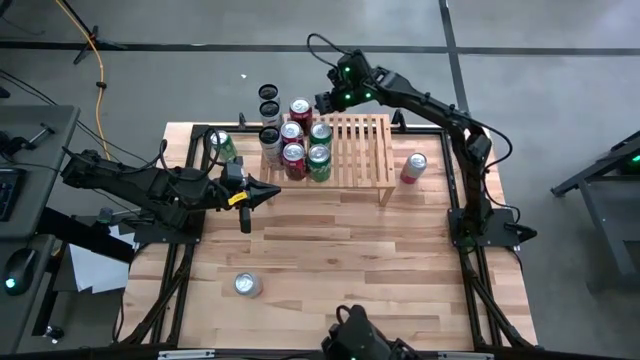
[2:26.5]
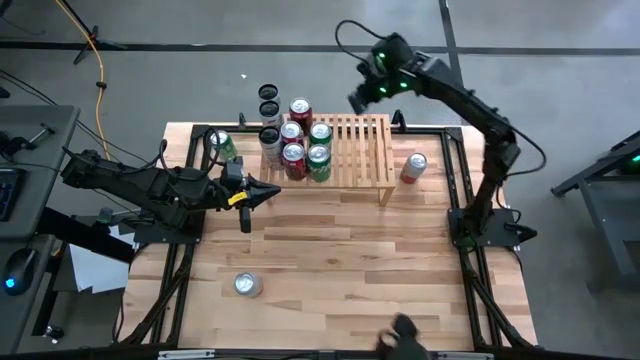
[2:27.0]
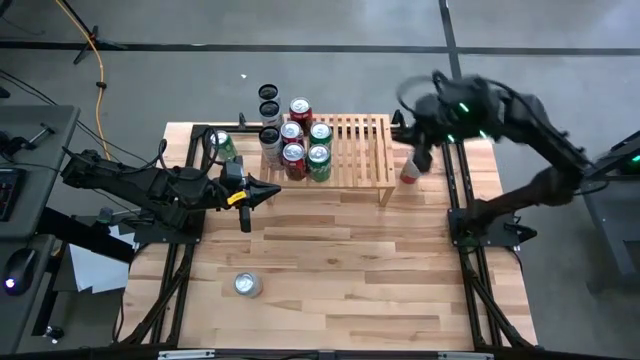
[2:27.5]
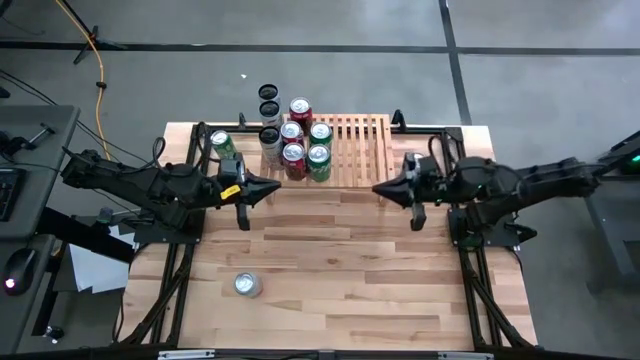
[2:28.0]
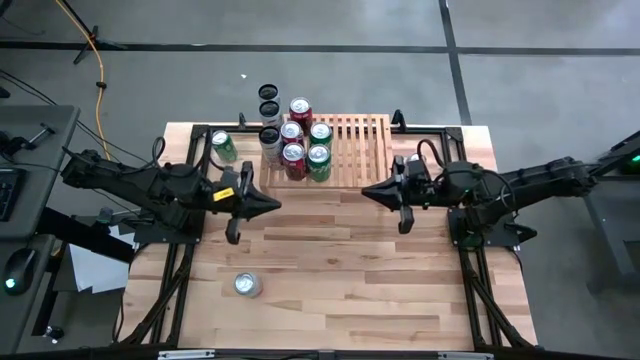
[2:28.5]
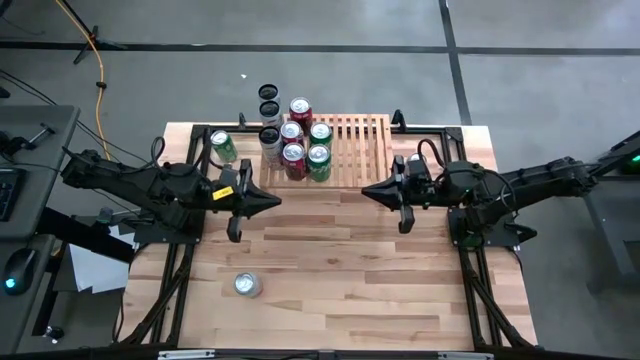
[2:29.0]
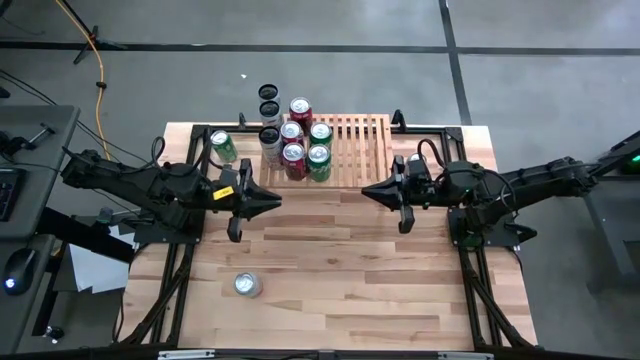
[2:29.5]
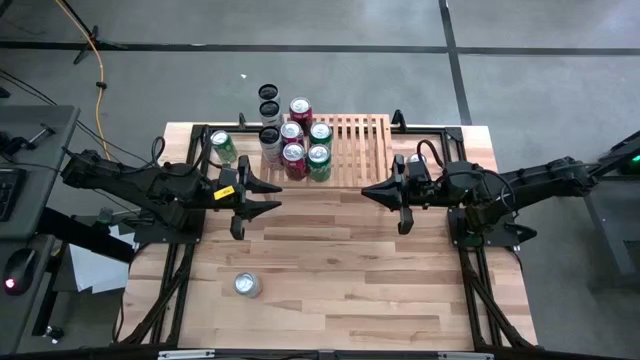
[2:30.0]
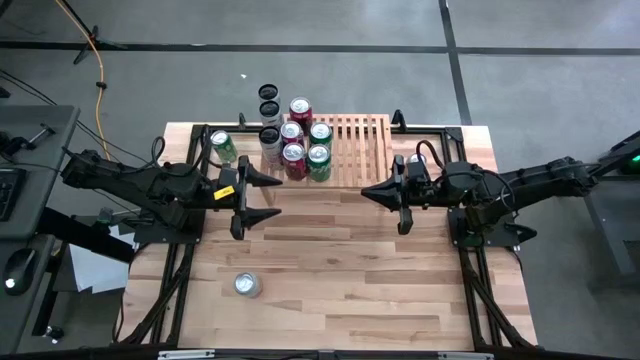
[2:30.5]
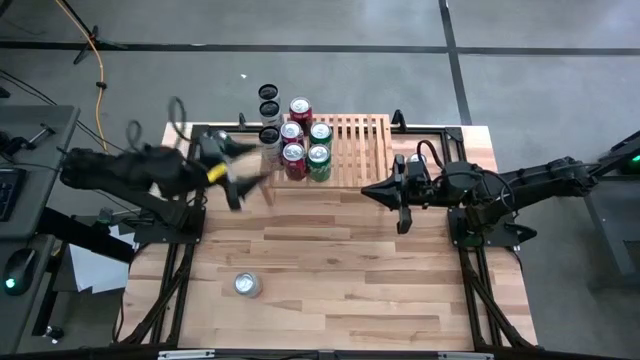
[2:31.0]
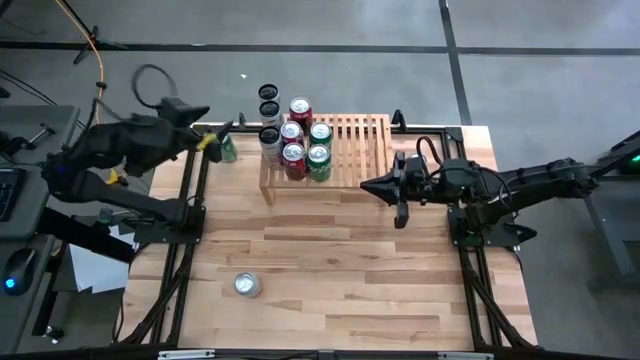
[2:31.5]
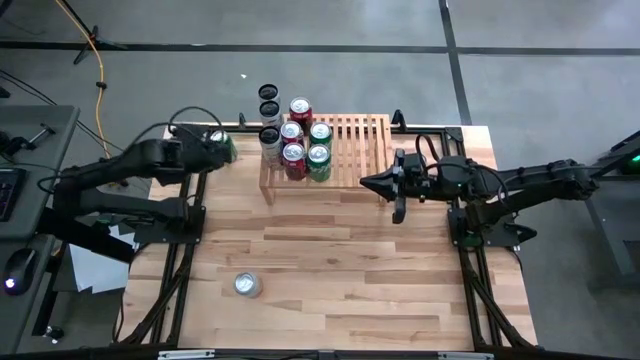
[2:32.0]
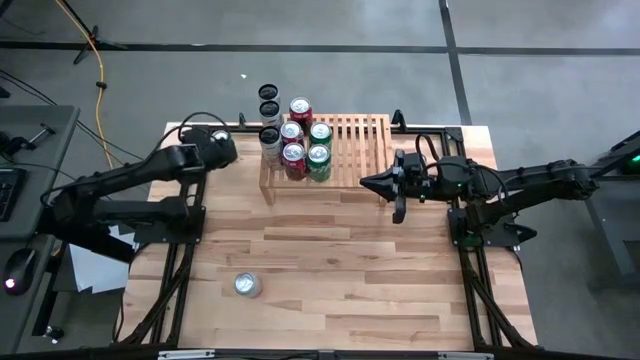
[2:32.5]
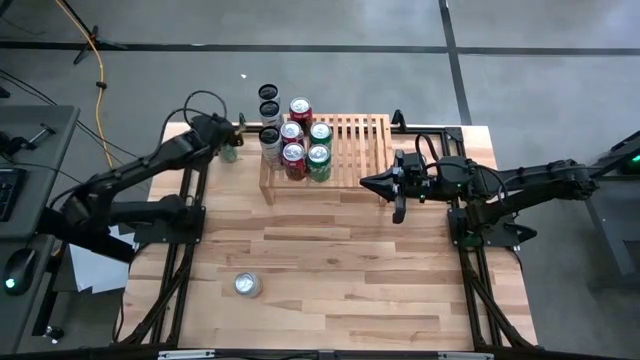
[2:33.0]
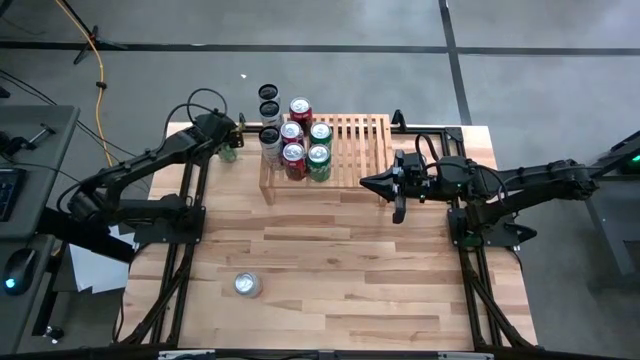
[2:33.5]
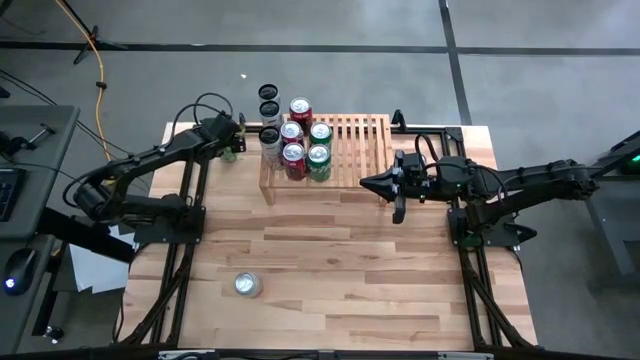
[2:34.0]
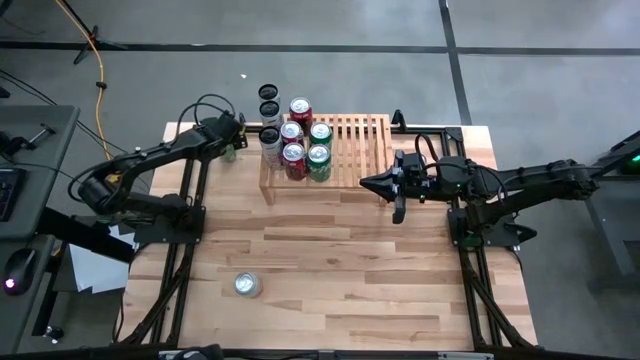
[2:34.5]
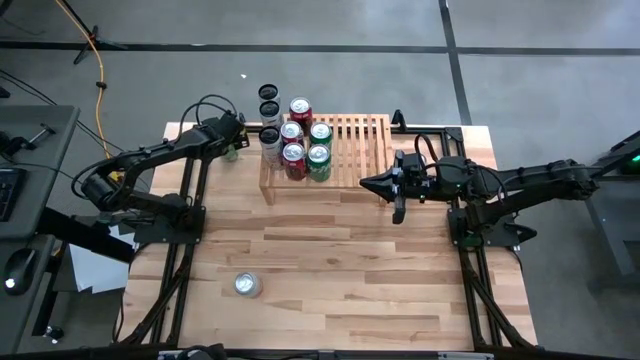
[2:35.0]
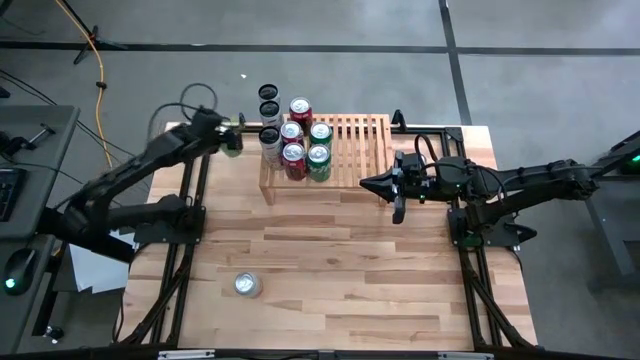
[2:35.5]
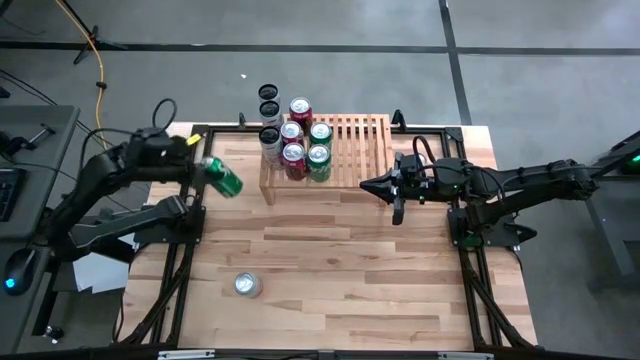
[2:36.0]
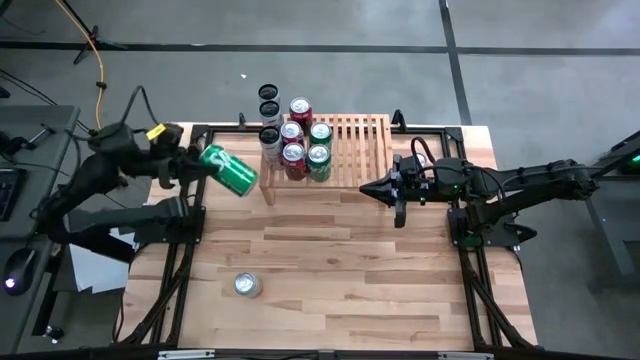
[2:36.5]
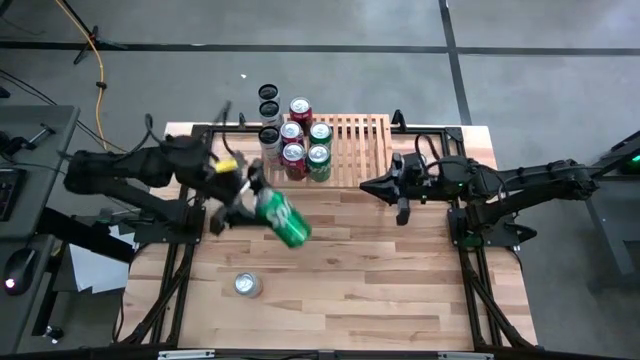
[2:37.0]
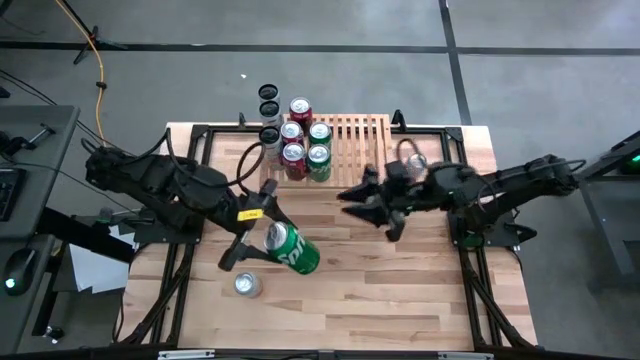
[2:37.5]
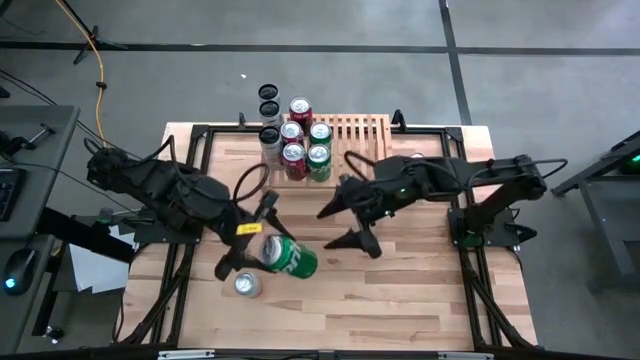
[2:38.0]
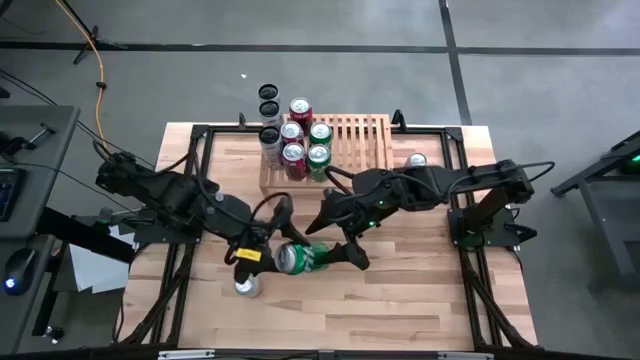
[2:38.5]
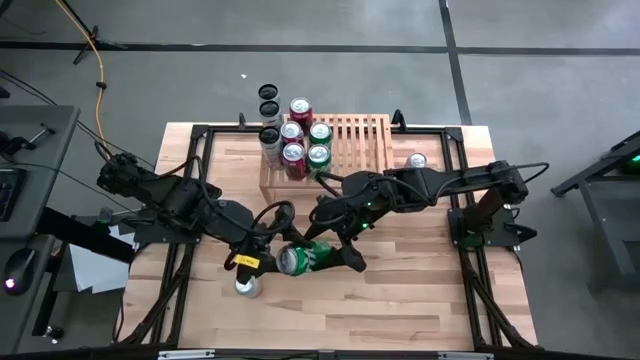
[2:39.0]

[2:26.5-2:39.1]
Task: Place canned beverage on shelf
Put the green soda can on the shelf aligned with the other green soda cans

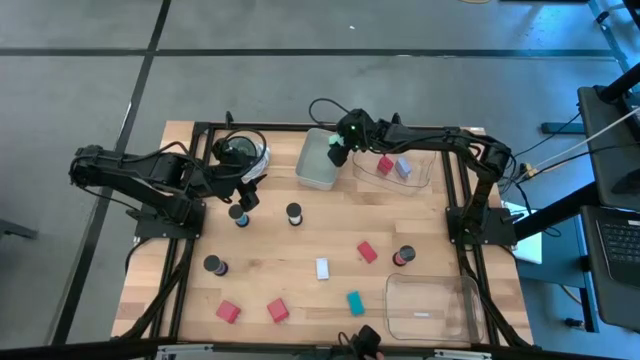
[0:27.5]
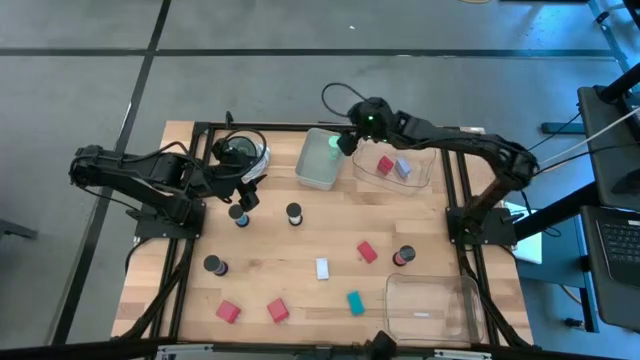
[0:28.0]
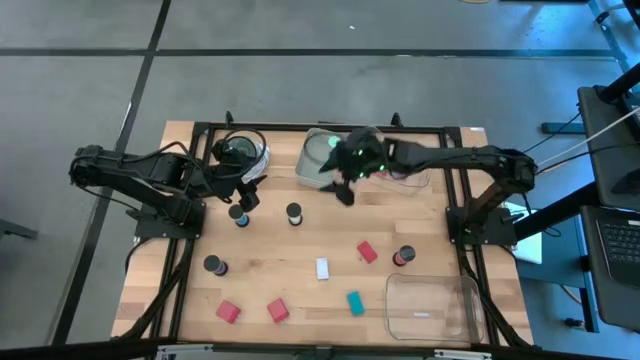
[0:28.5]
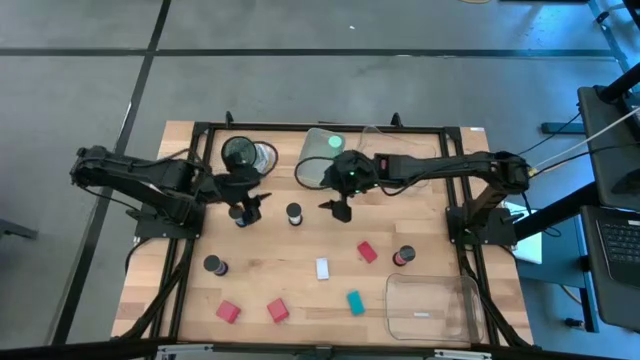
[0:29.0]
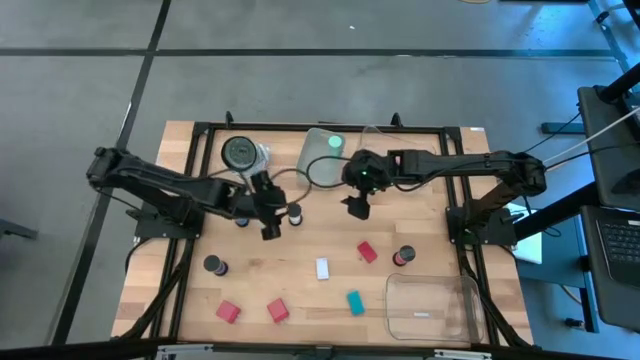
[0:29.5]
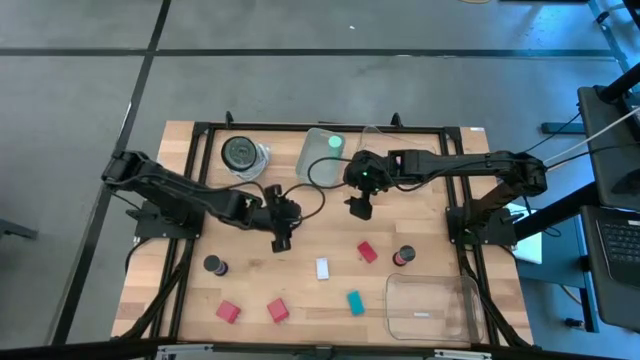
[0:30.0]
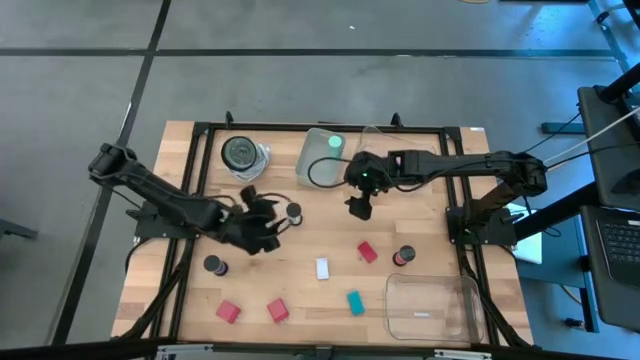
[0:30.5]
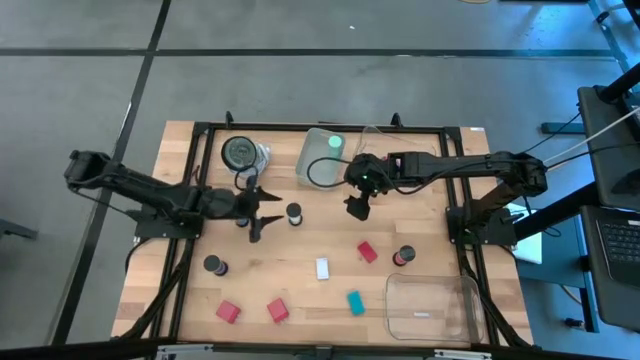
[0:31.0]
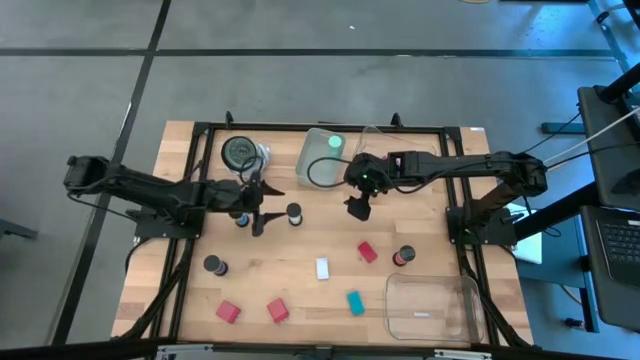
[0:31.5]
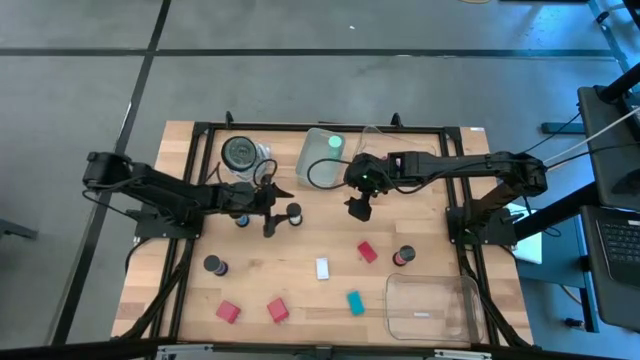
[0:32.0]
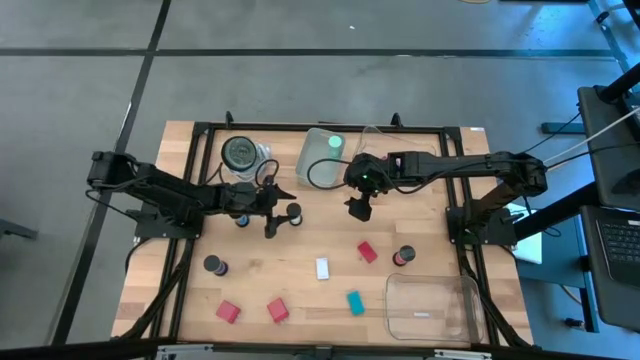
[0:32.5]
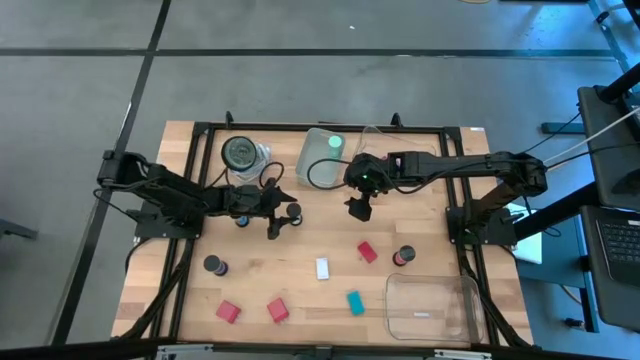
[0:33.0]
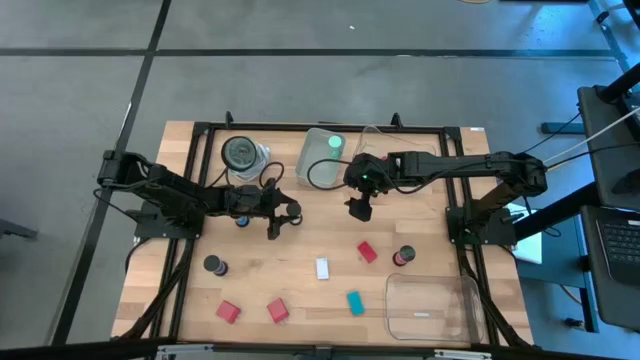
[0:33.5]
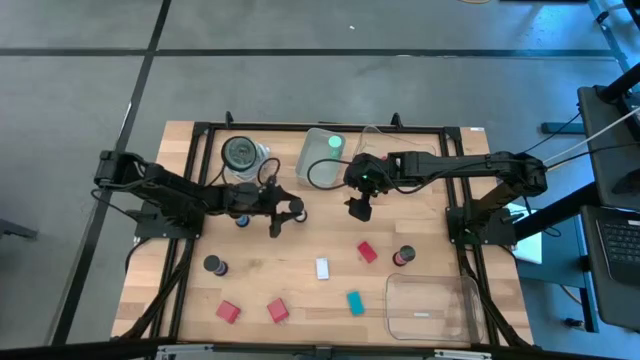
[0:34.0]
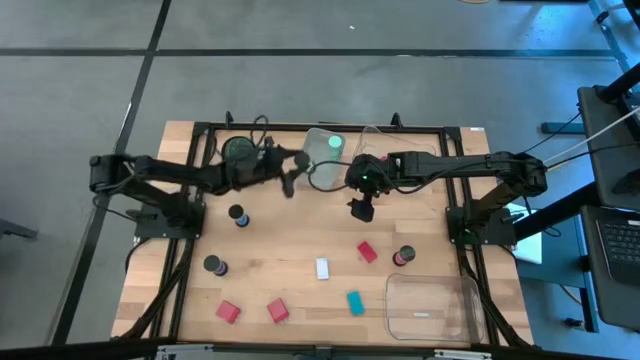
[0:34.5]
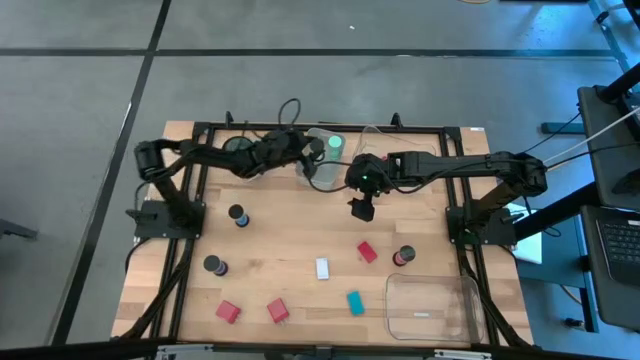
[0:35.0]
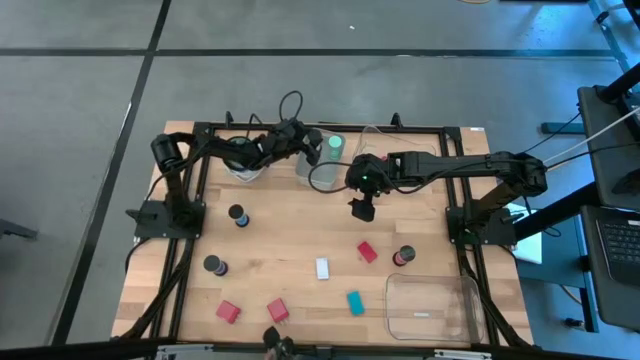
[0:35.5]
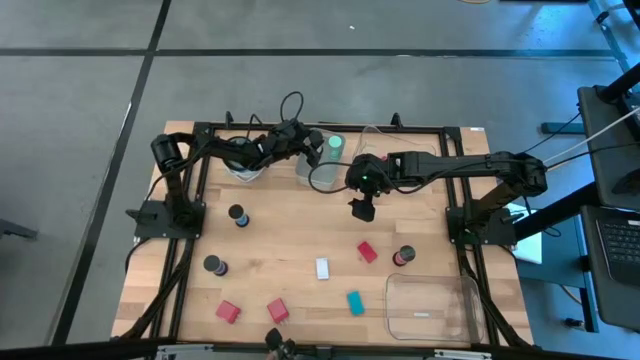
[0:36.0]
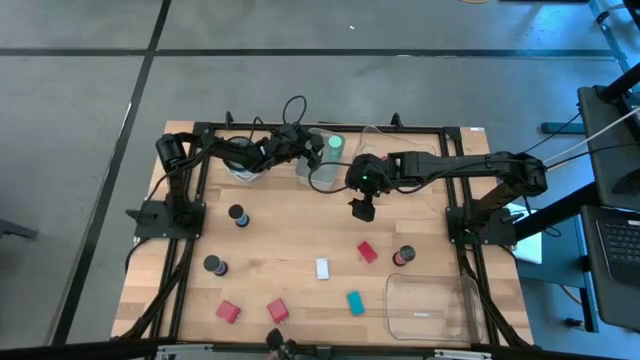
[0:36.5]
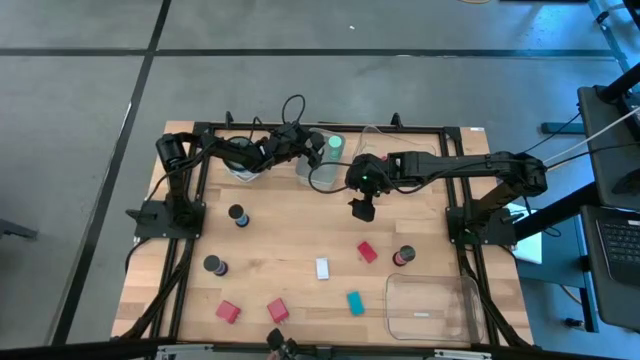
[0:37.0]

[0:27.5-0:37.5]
Task: Pick & Place Office items
Put the white hourglass into the gray bin
